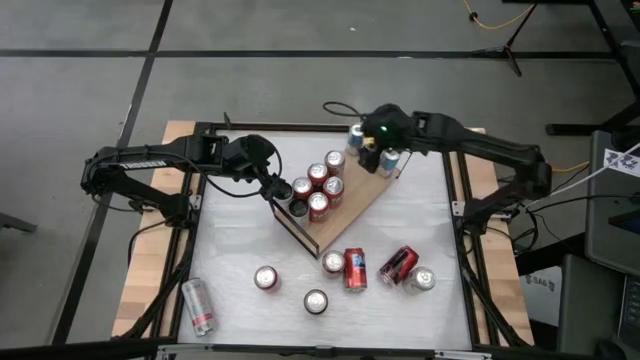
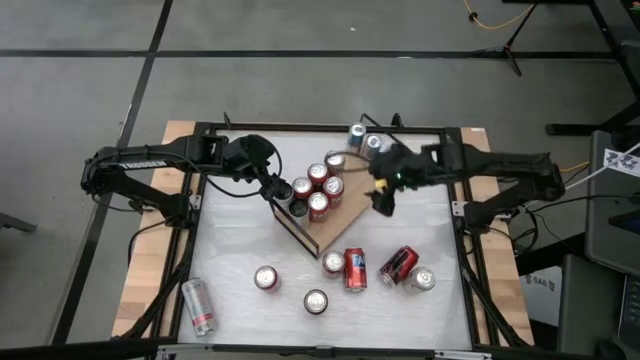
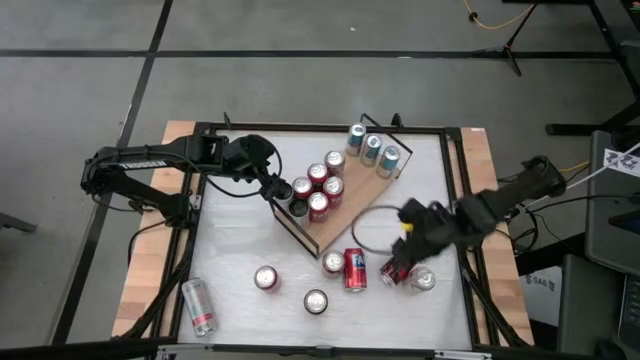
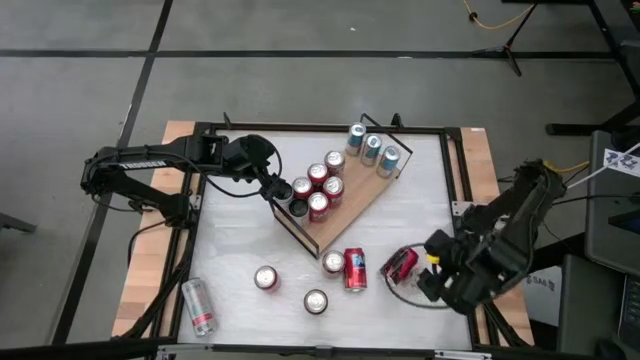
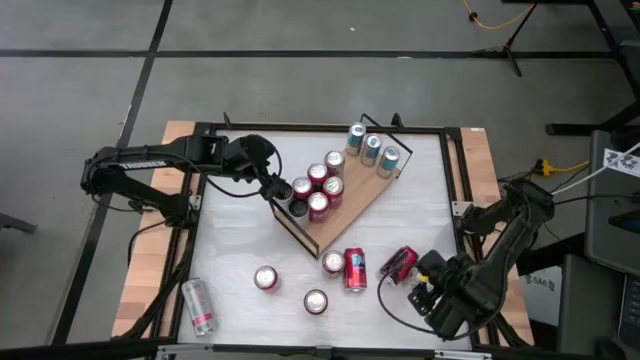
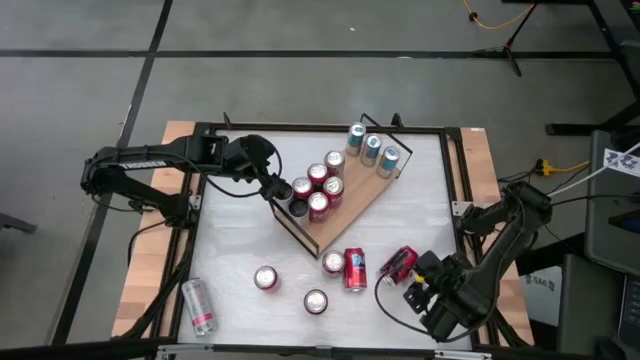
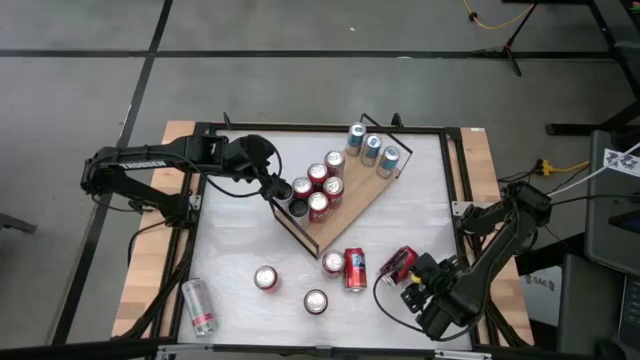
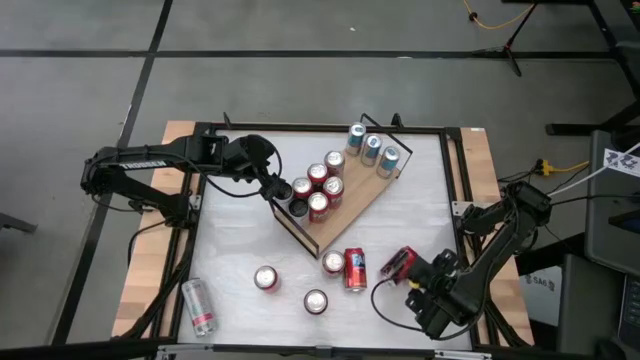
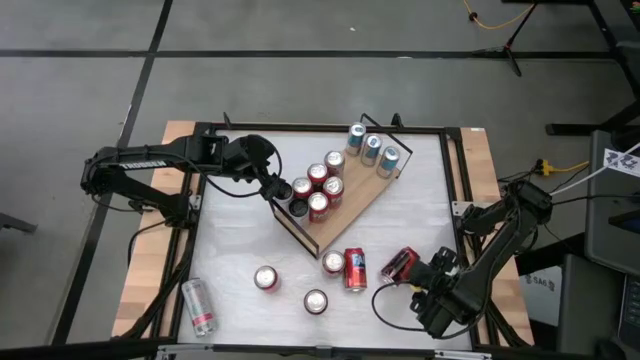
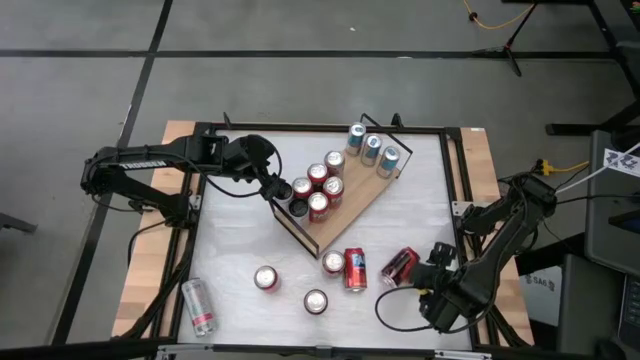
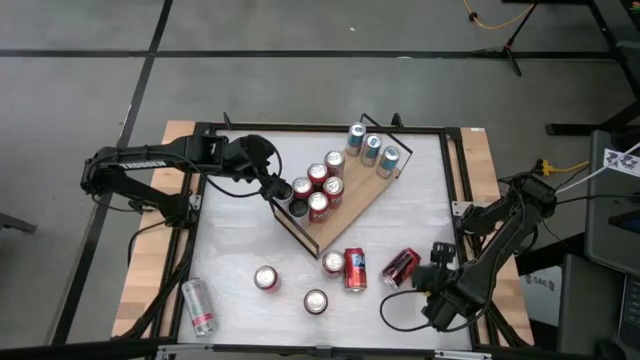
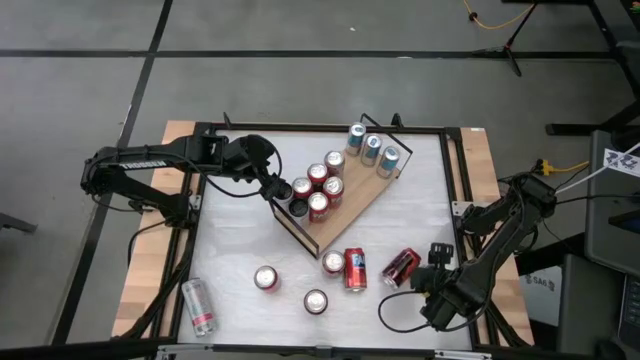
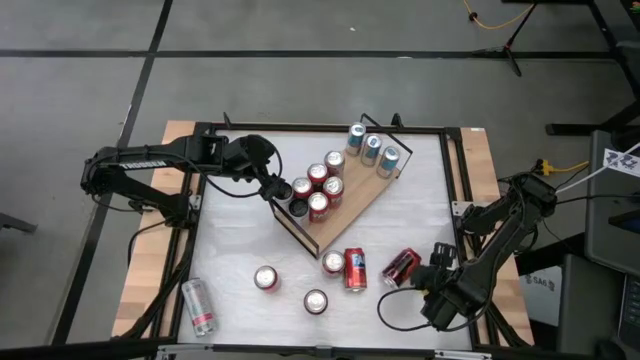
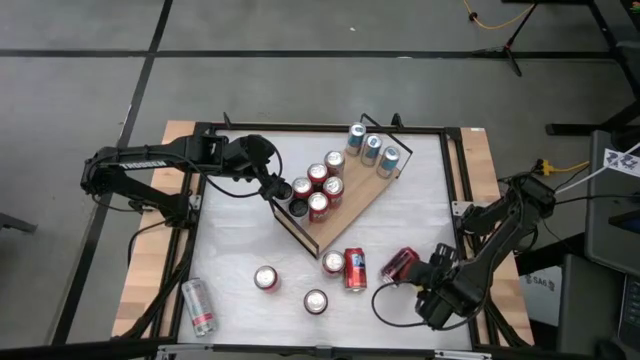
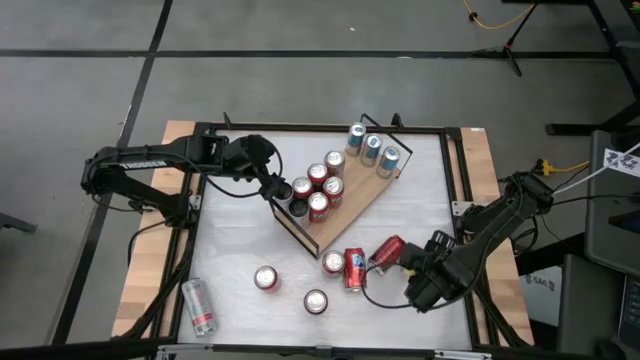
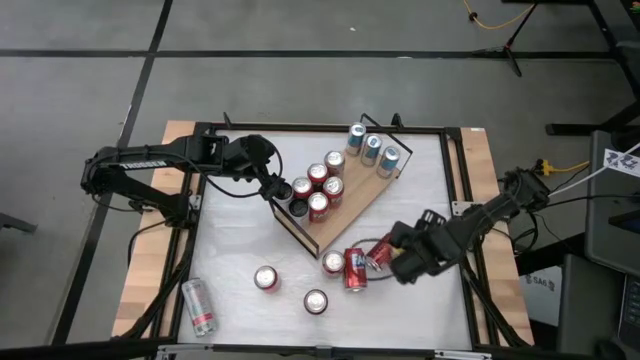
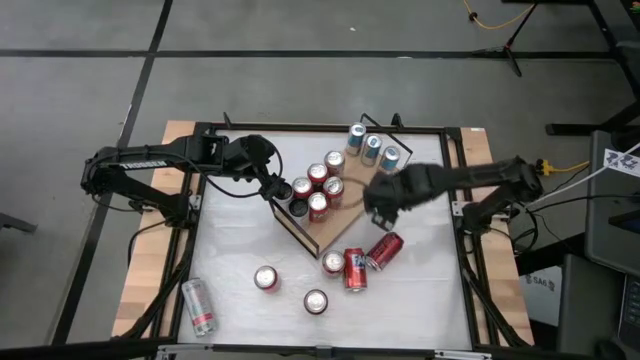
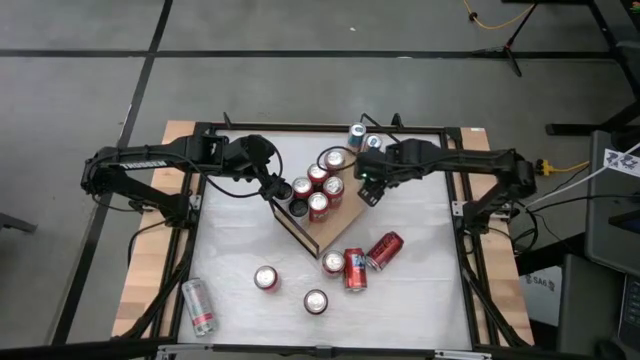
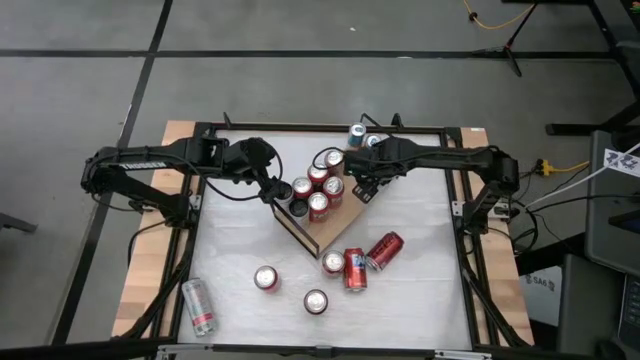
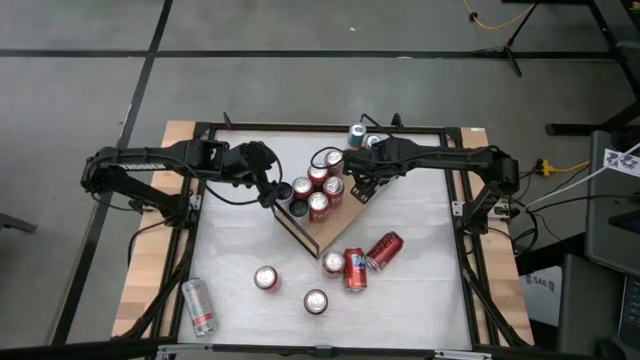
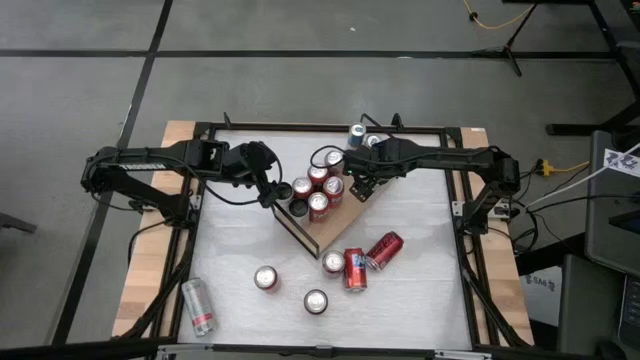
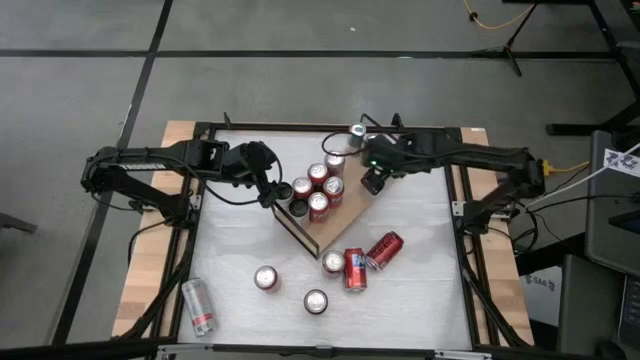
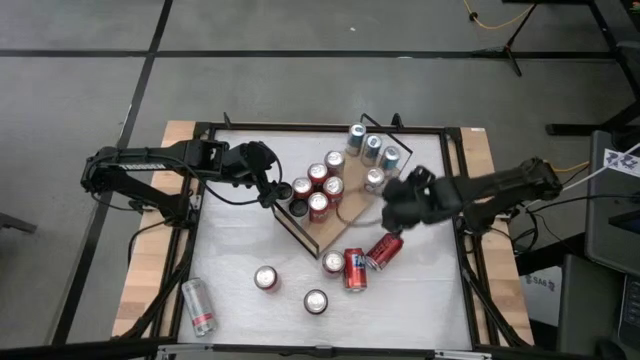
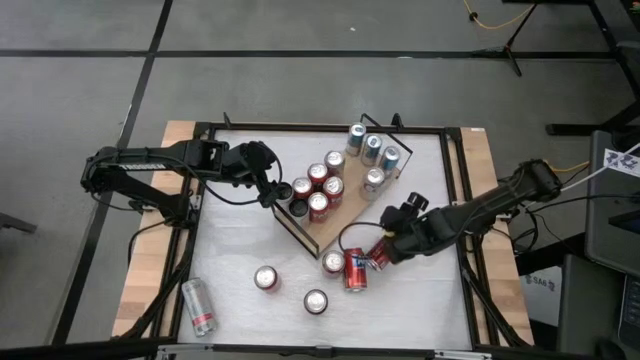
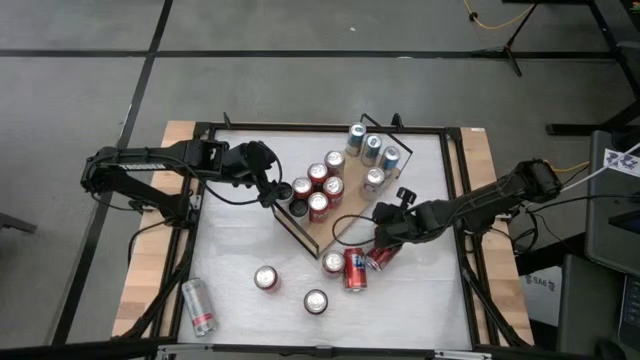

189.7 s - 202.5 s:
Task: Place canned beverage on shelf
Put the red silver soda can on the shelf

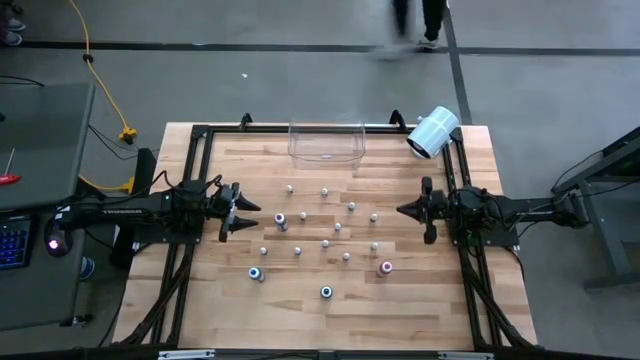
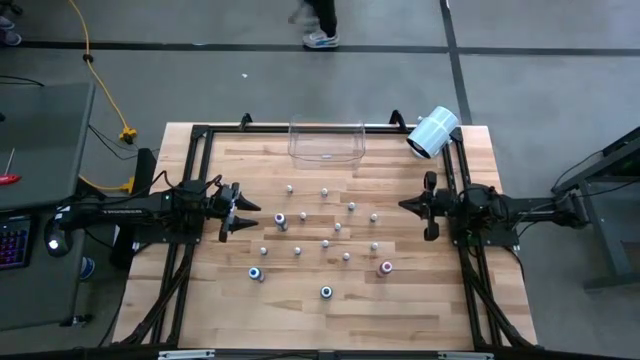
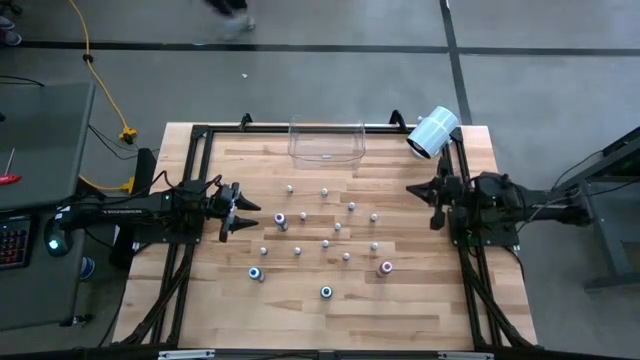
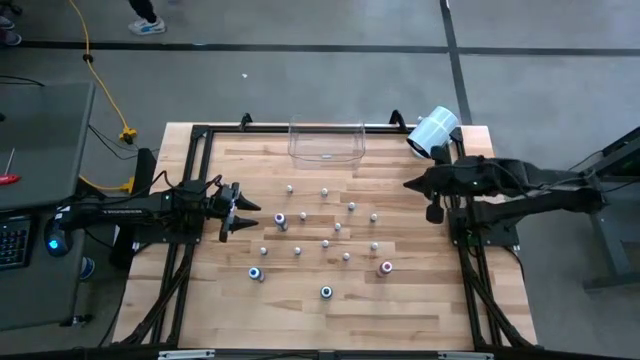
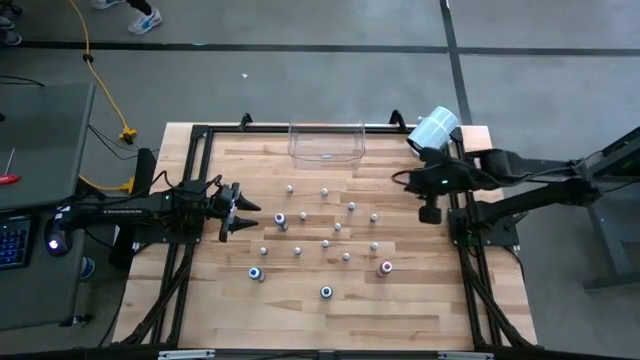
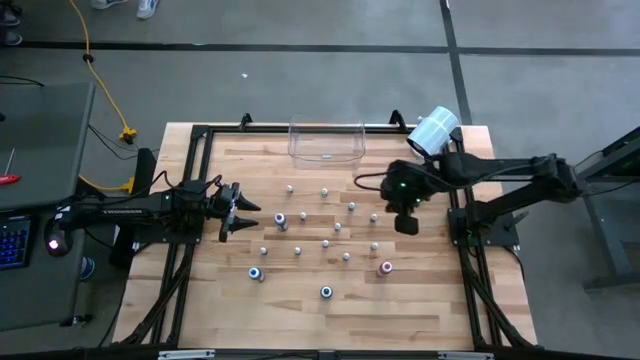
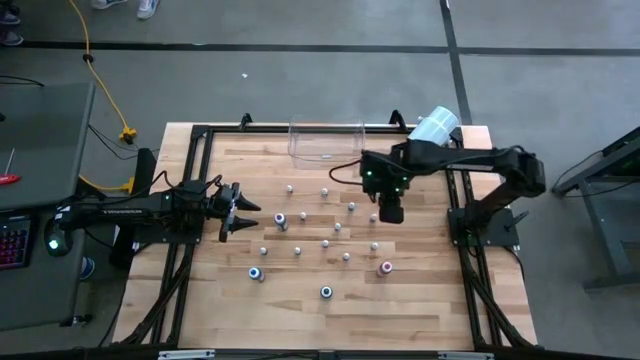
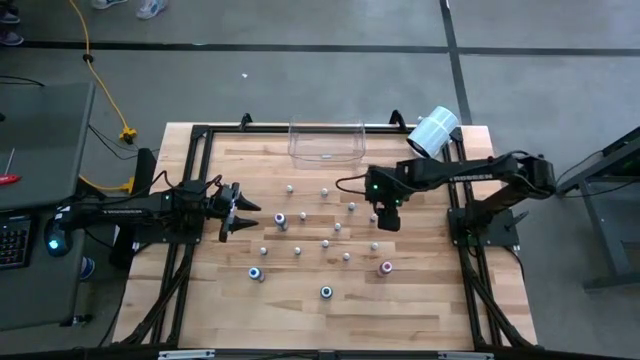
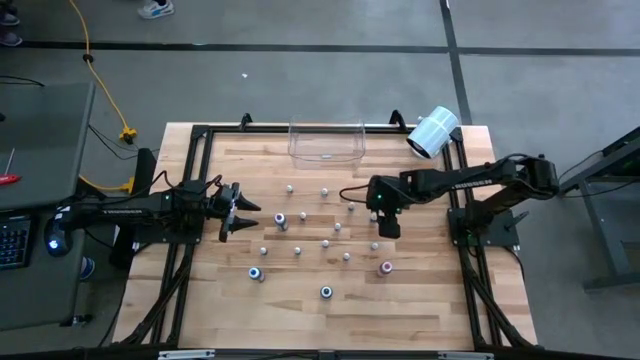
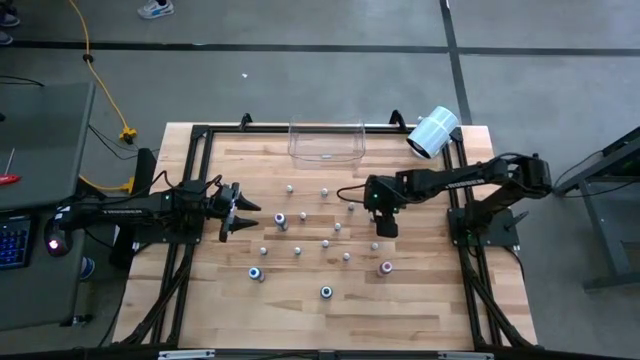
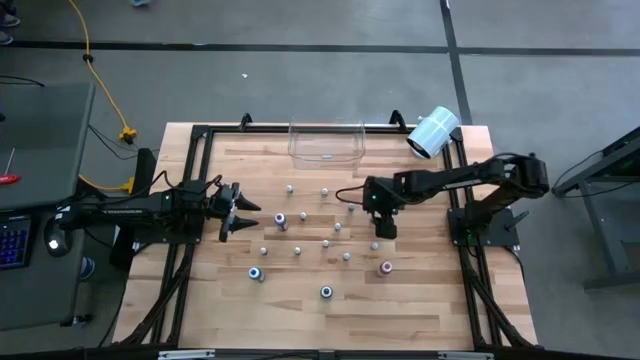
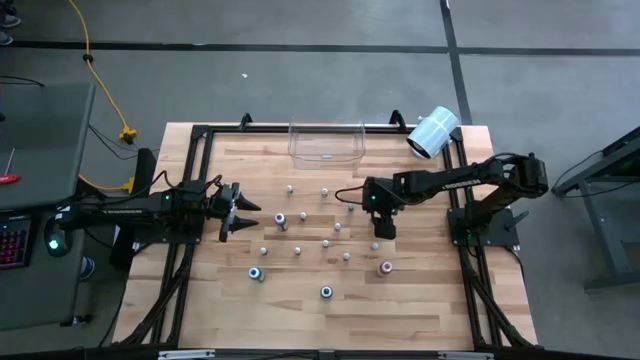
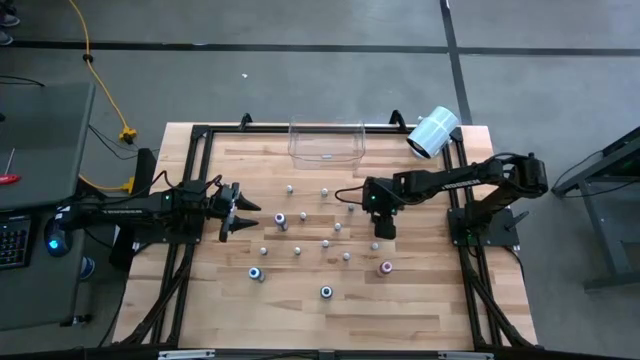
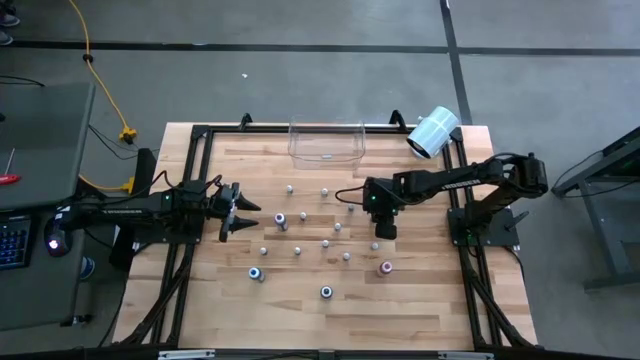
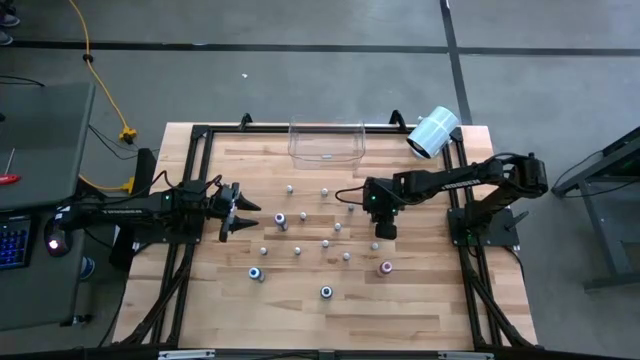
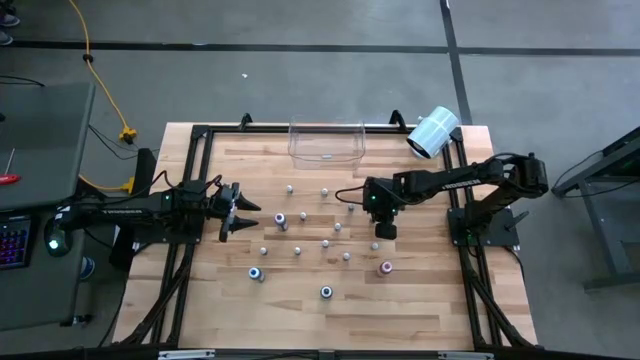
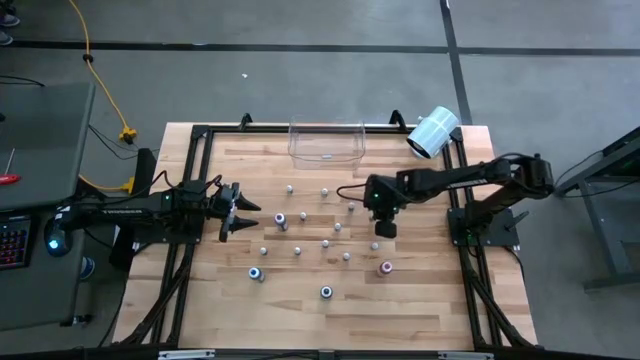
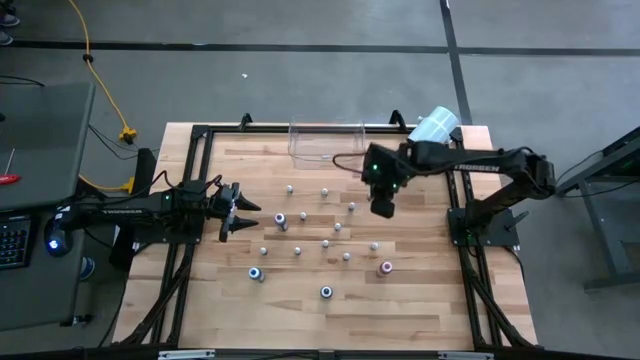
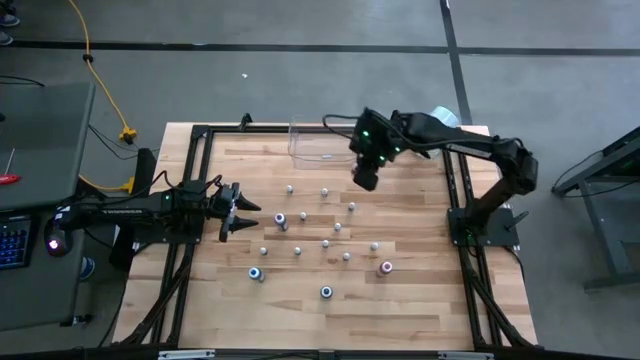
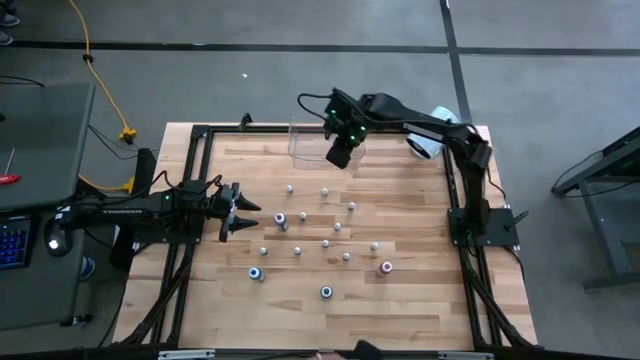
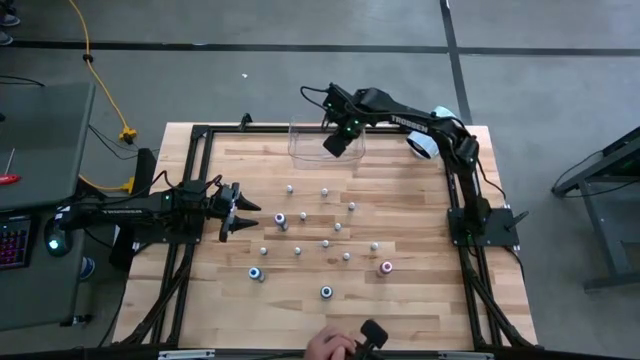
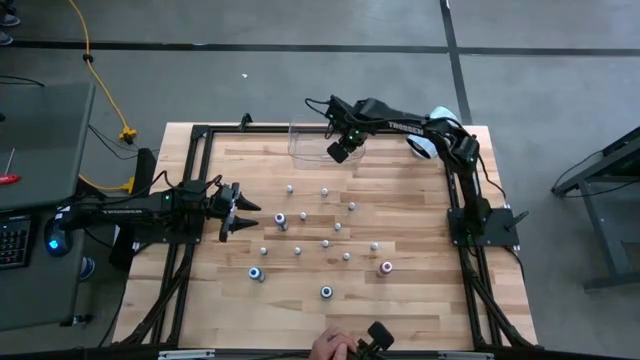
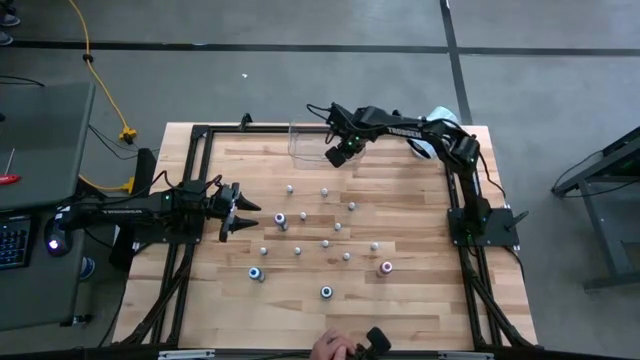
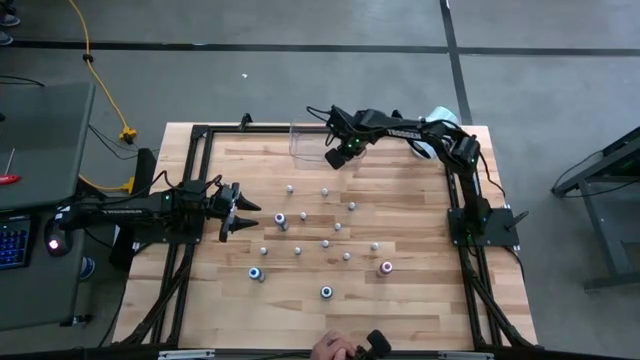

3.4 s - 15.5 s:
Task: Pick & Place food coloring
Put the small green food coloring into the transparent container
